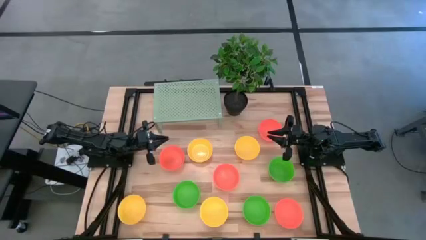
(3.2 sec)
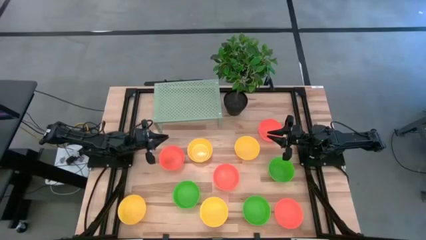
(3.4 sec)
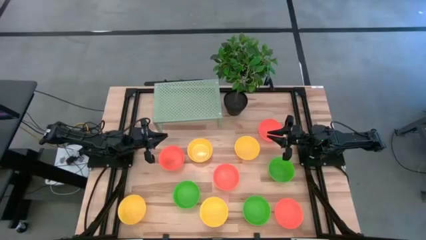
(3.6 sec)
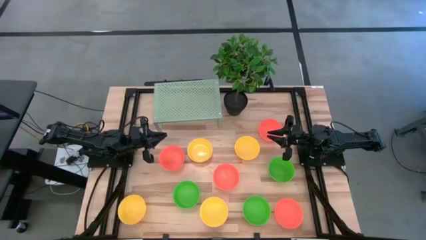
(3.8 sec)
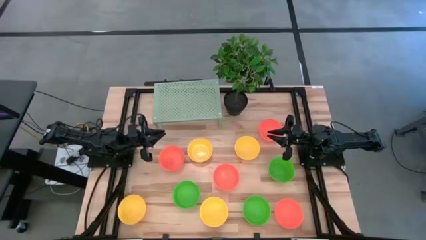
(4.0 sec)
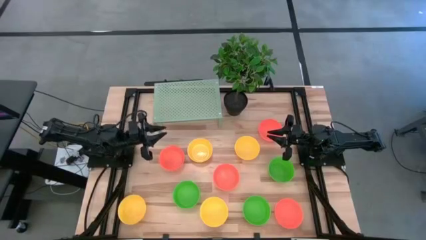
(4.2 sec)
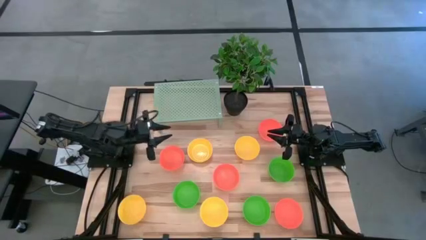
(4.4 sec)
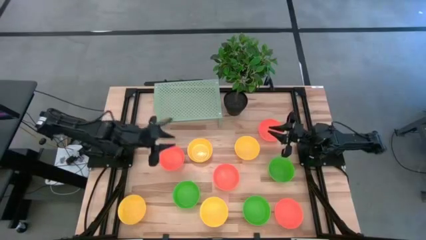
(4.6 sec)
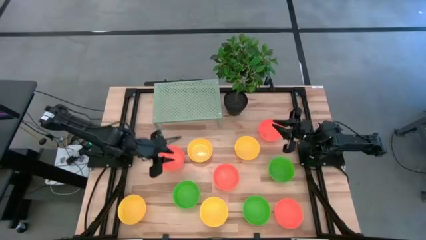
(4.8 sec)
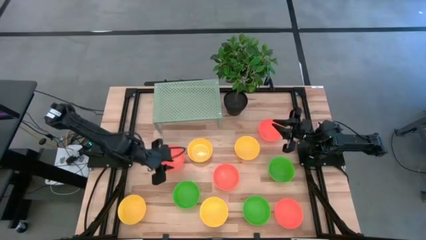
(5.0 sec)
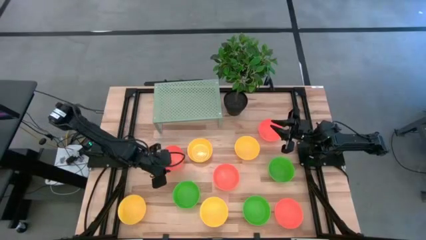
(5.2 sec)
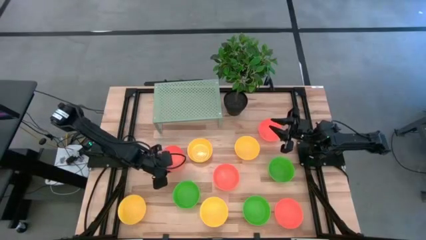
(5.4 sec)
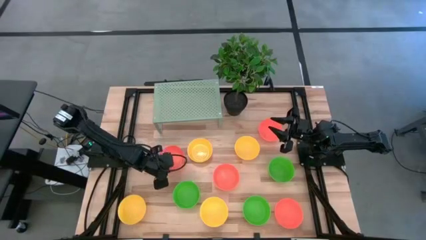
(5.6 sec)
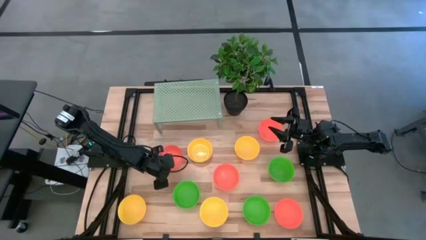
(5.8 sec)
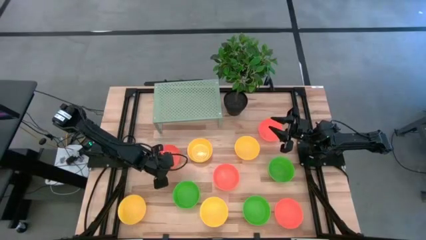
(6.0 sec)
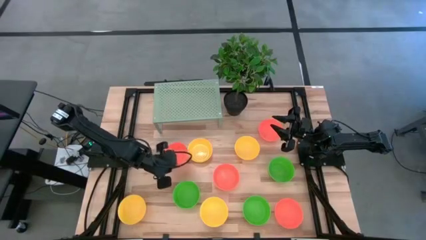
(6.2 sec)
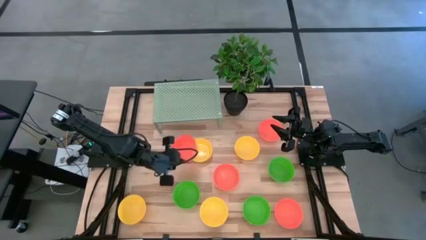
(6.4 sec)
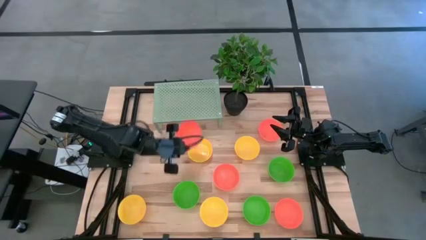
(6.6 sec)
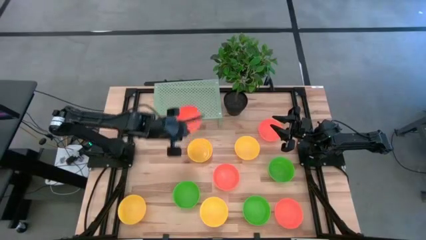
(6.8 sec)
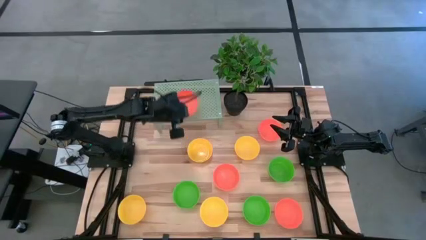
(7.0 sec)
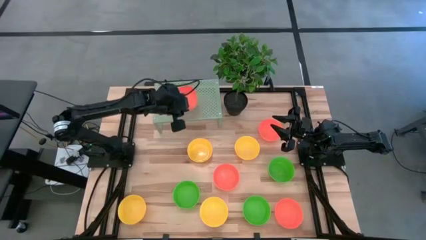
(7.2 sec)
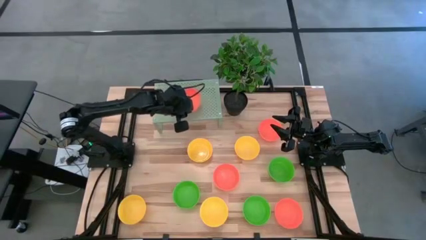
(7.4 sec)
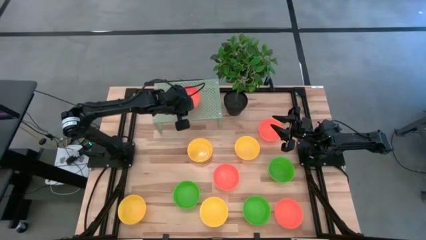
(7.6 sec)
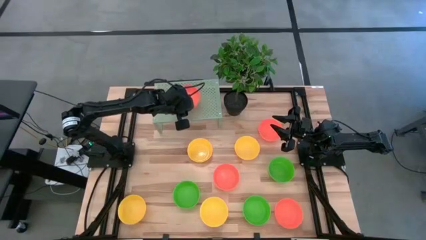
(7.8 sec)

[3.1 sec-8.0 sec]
Task: Pick & Place Mini bowls
Put the orange bowl on the shelf

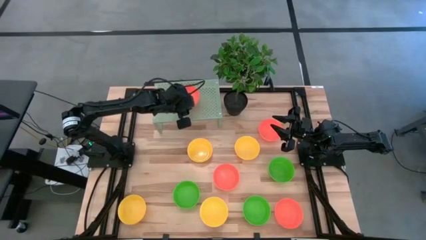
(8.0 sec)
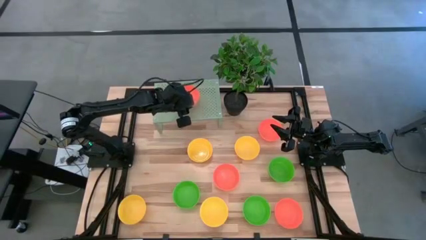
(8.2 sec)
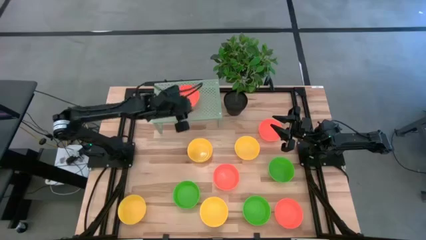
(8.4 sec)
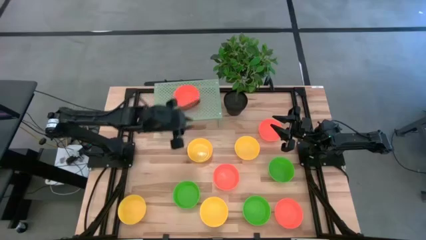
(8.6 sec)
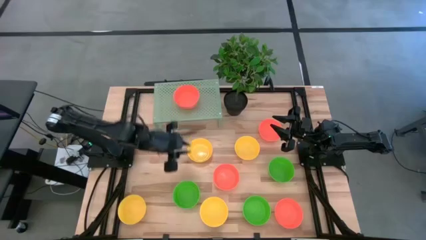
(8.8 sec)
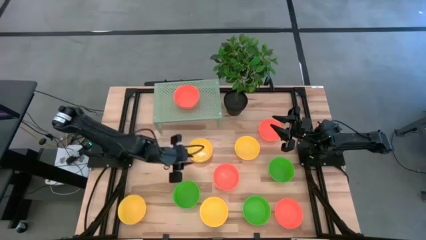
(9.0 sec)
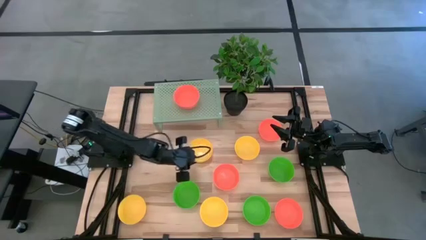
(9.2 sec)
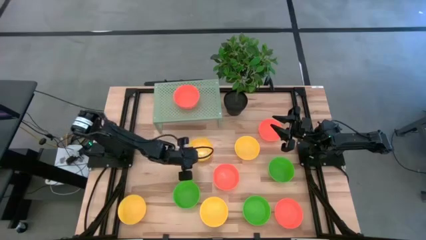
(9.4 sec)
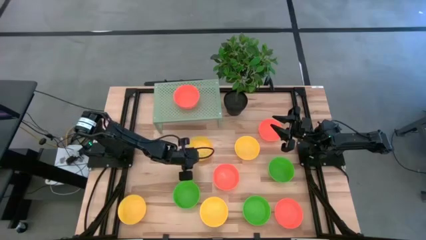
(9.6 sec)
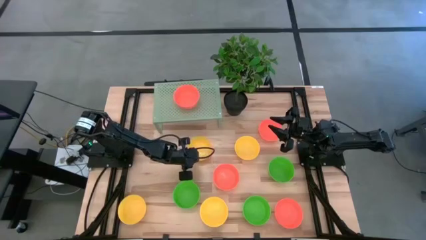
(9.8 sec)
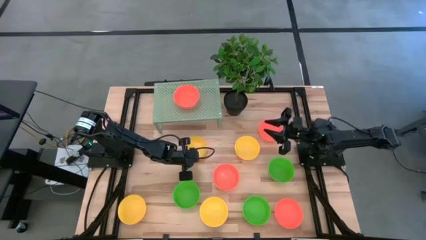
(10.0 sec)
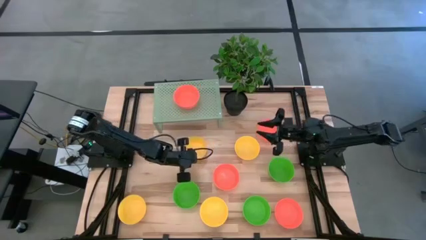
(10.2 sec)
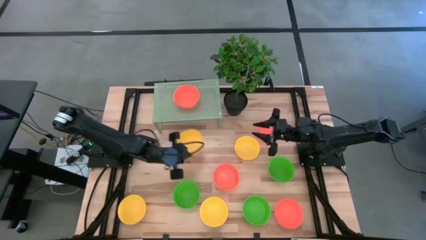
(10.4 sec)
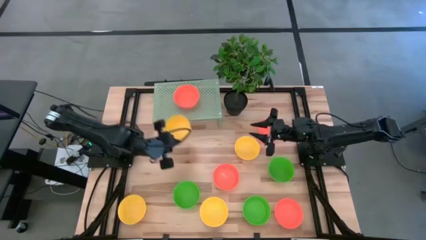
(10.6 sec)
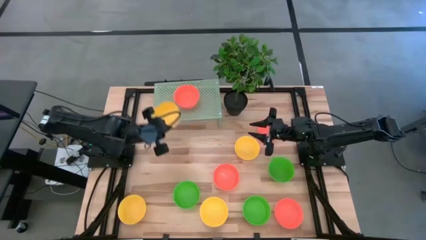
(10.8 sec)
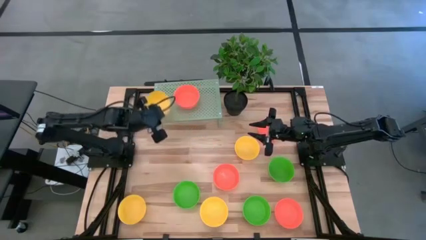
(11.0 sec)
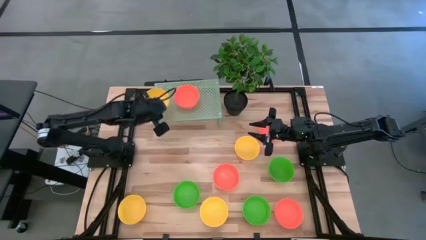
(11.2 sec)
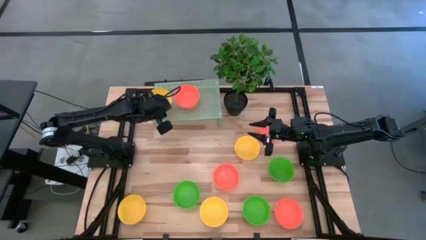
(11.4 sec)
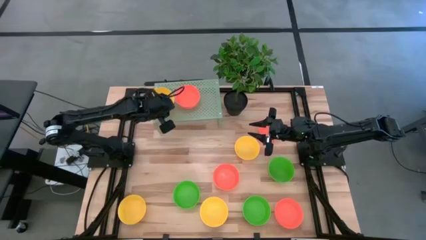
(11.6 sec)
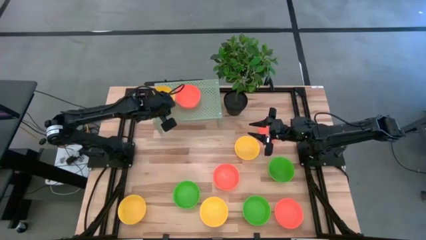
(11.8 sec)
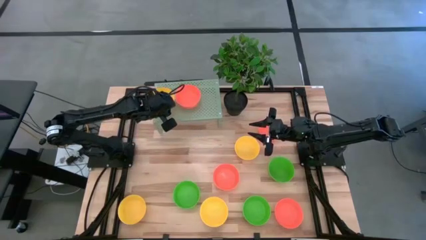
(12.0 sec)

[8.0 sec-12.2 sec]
Put the yellow bowl on the shelf

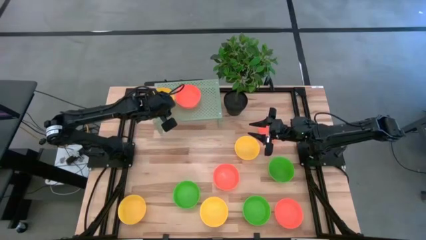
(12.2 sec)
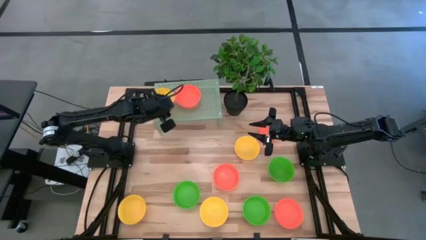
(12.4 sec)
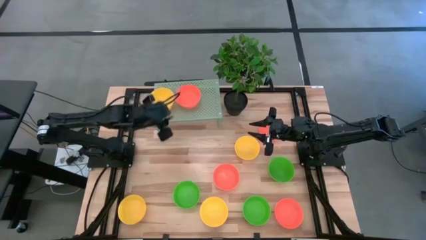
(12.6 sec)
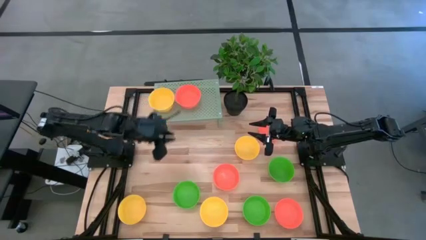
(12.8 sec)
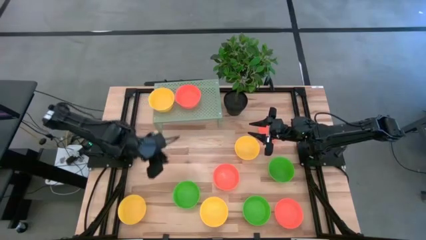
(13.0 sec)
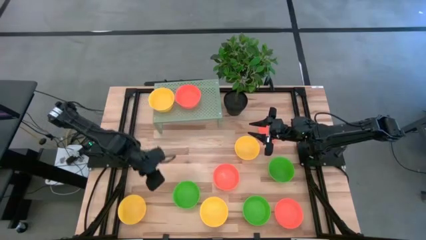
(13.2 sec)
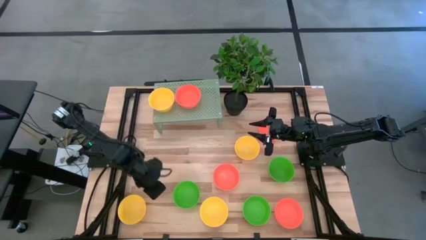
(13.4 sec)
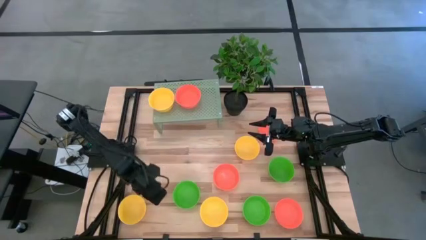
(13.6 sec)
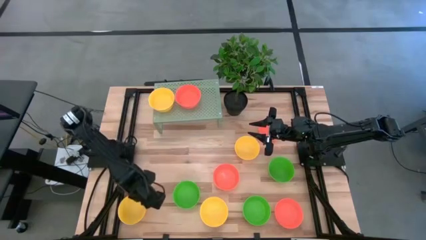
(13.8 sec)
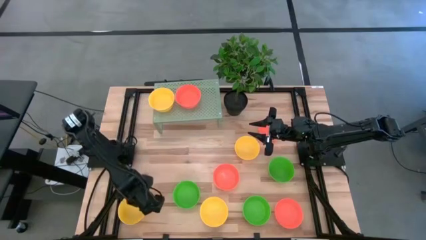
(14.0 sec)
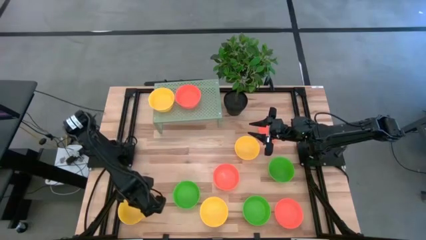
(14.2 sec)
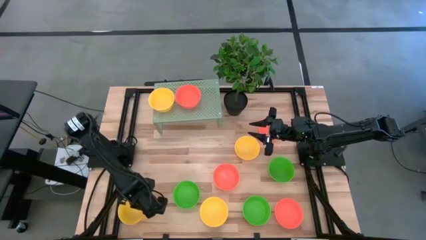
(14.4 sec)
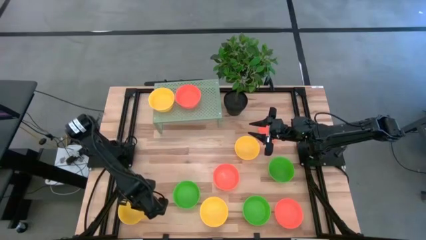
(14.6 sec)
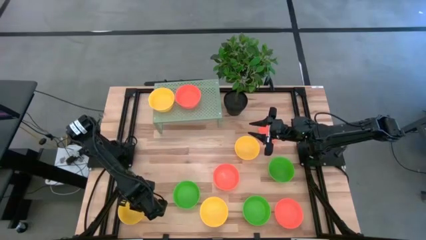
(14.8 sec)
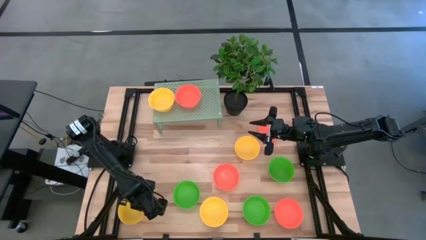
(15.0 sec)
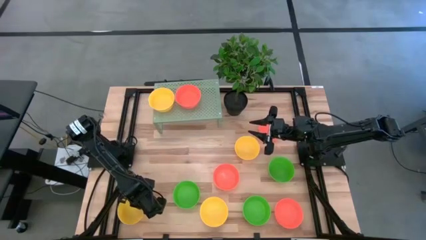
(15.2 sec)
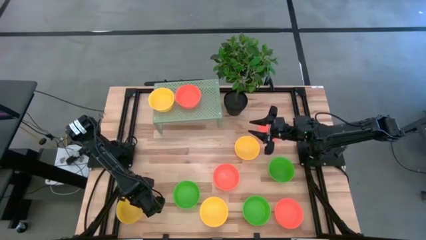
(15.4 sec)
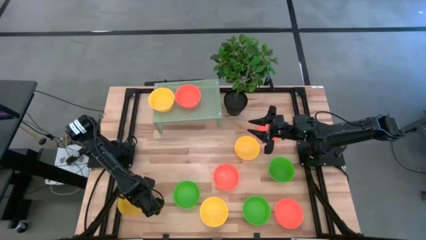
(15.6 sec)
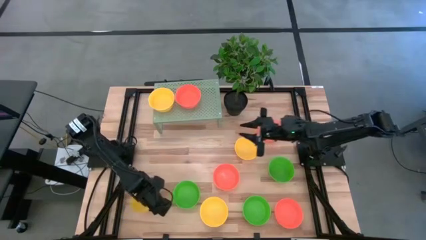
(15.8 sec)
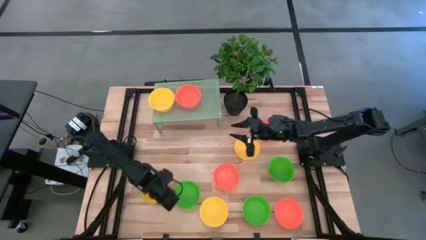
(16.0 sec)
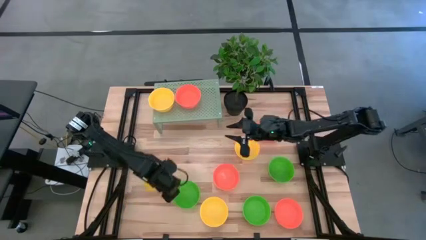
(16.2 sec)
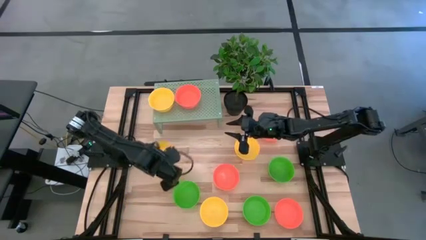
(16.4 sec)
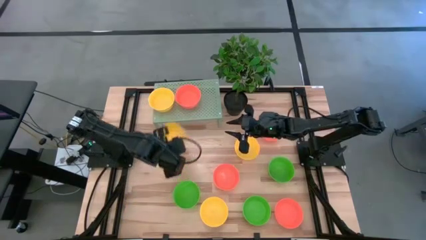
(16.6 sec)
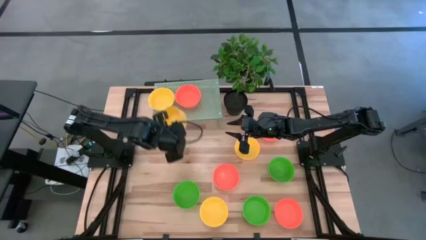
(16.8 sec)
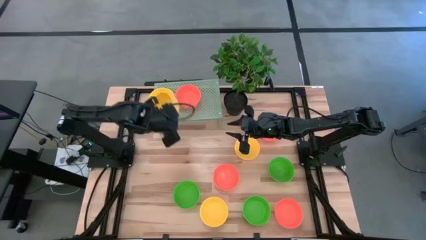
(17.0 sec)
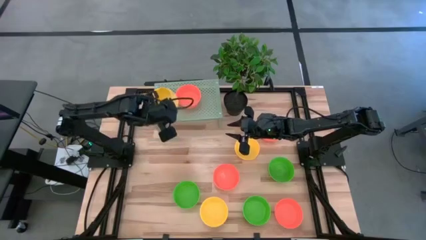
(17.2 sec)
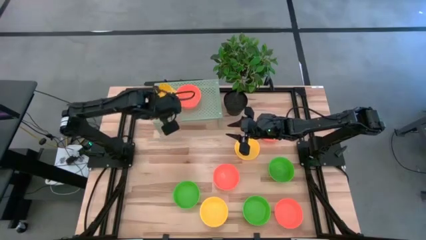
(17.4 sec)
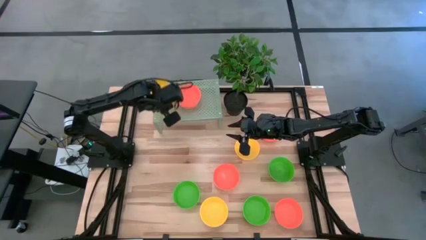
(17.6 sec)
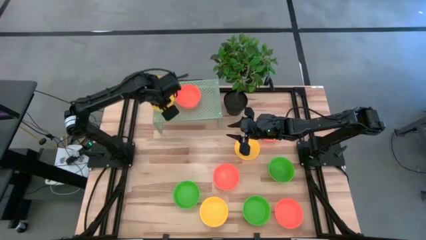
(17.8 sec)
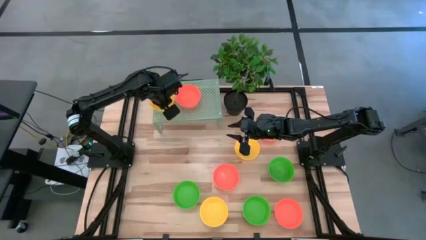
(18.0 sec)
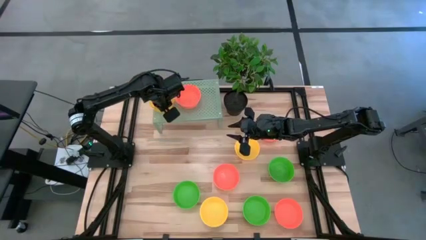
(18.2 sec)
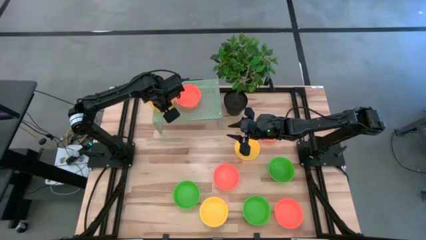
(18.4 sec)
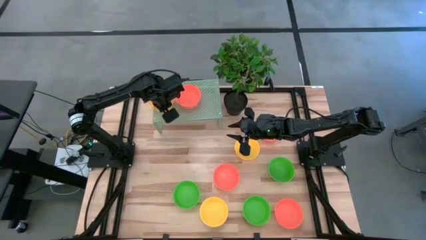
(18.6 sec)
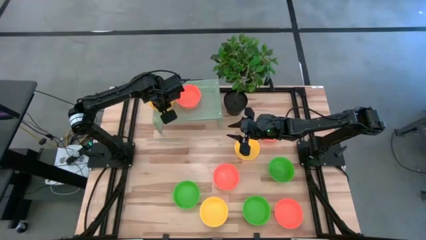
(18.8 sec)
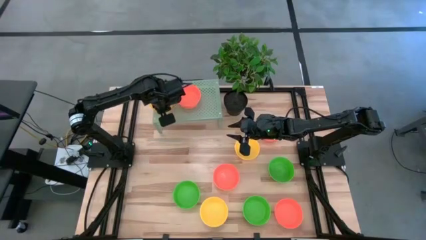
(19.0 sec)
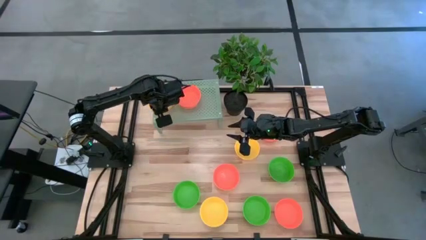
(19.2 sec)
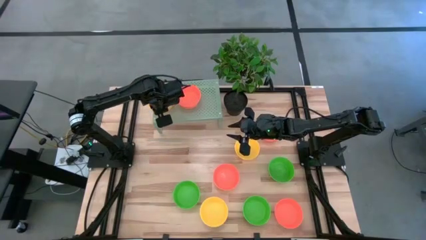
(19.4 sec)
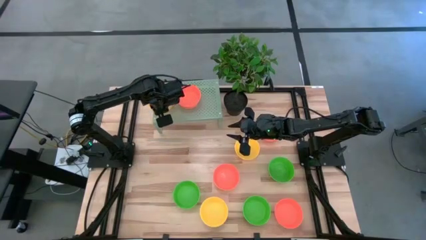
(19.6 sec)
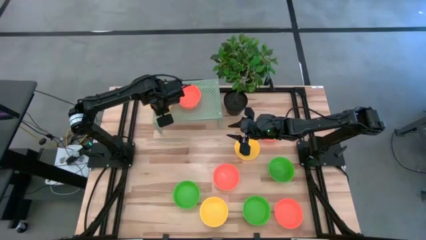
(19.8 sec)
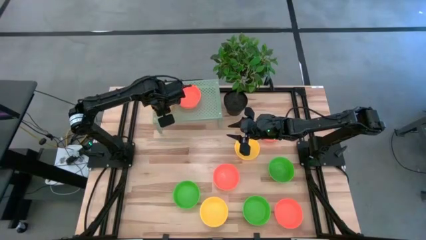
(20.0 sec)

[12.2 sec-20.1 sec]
Stack the yellow bowl on top of the other yellow bowl on the shelf
